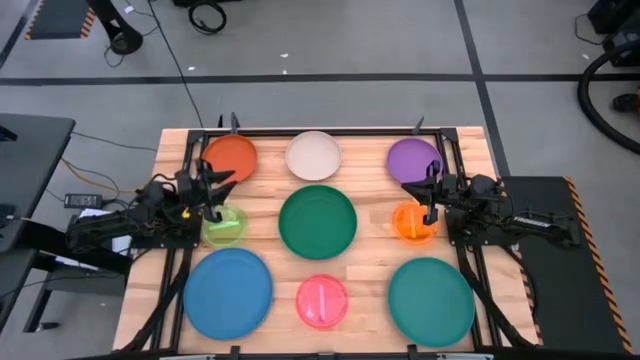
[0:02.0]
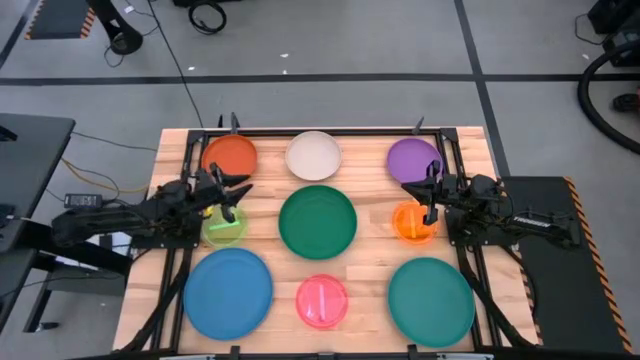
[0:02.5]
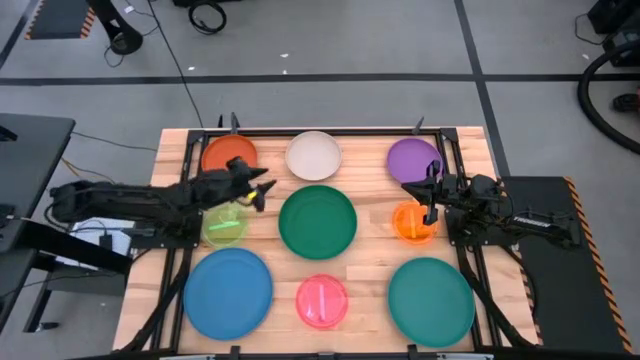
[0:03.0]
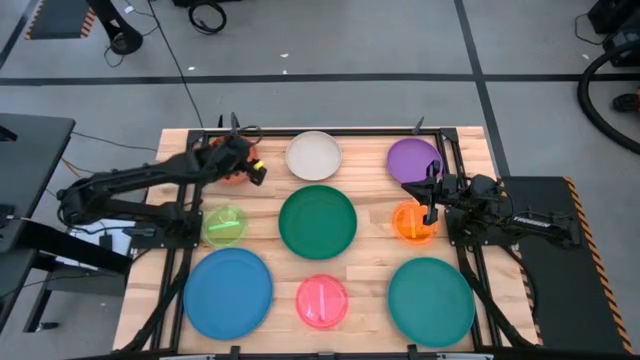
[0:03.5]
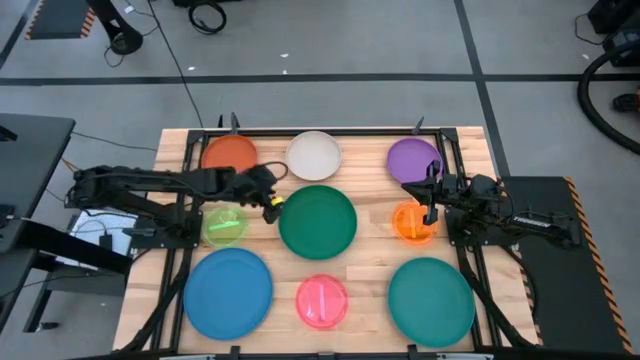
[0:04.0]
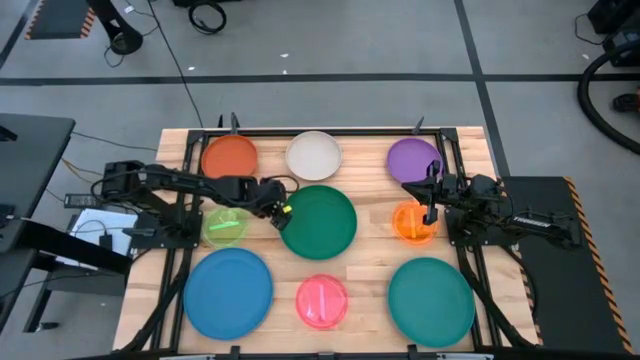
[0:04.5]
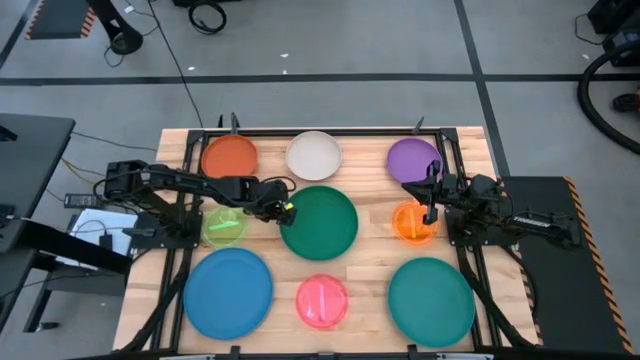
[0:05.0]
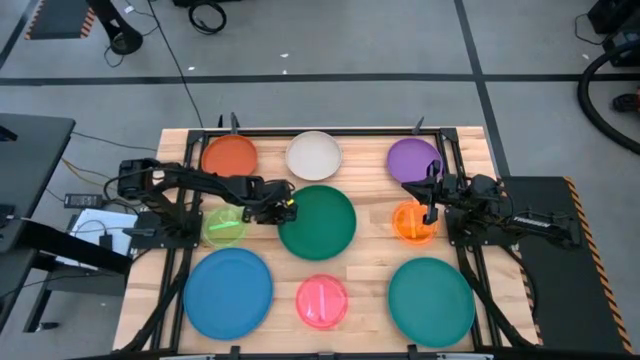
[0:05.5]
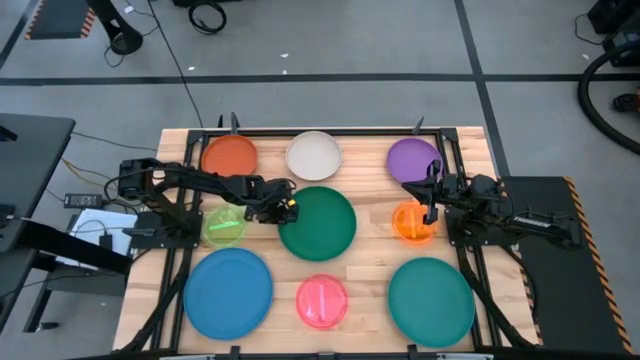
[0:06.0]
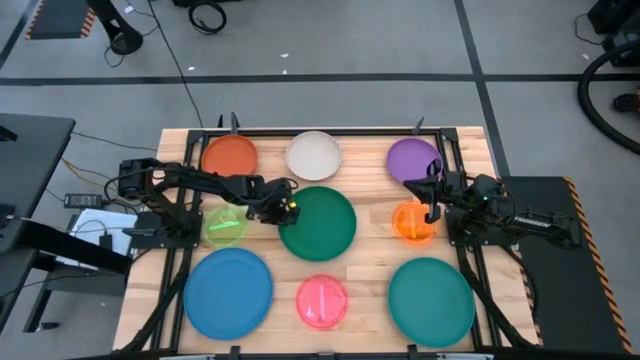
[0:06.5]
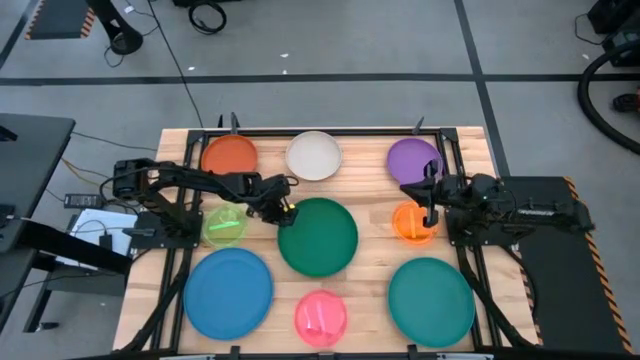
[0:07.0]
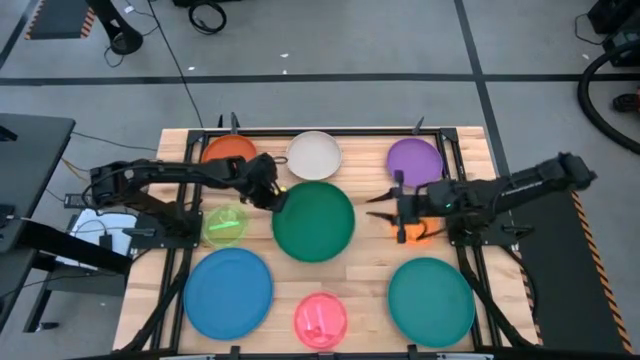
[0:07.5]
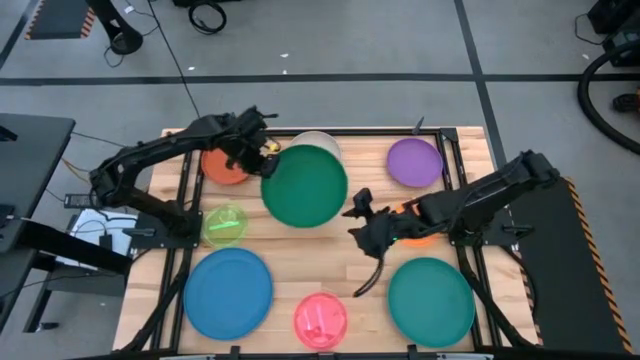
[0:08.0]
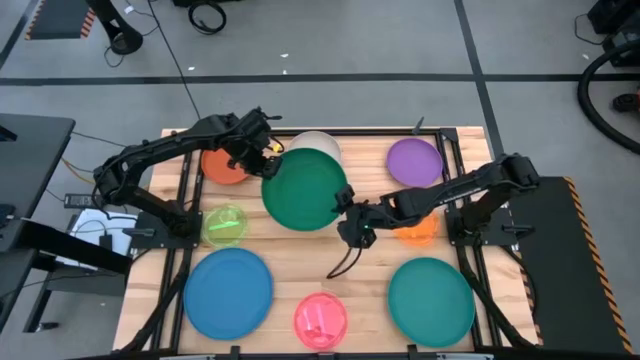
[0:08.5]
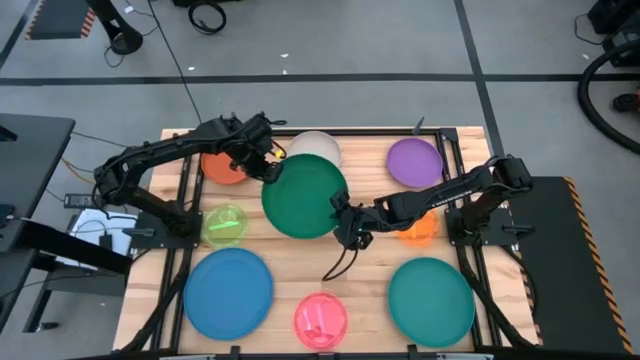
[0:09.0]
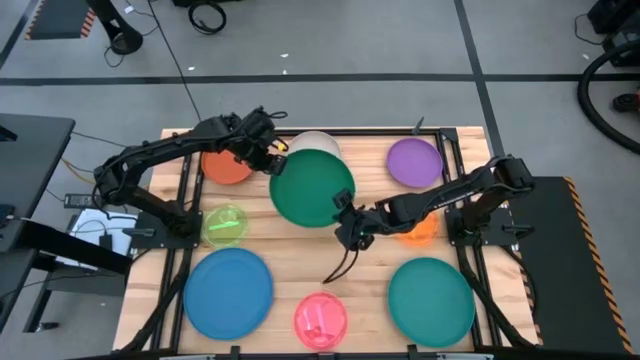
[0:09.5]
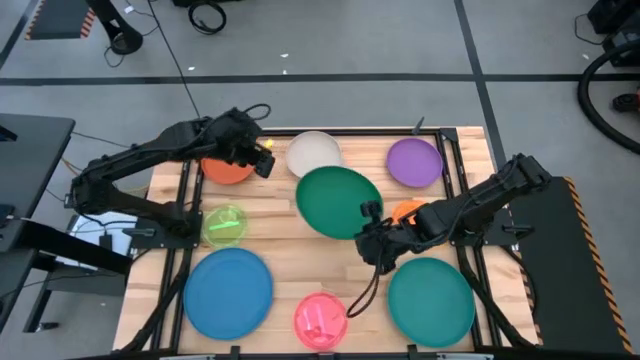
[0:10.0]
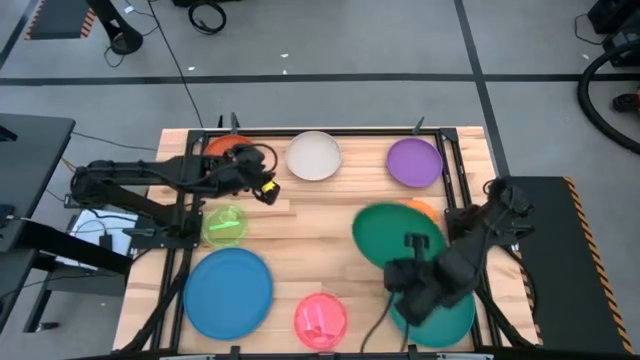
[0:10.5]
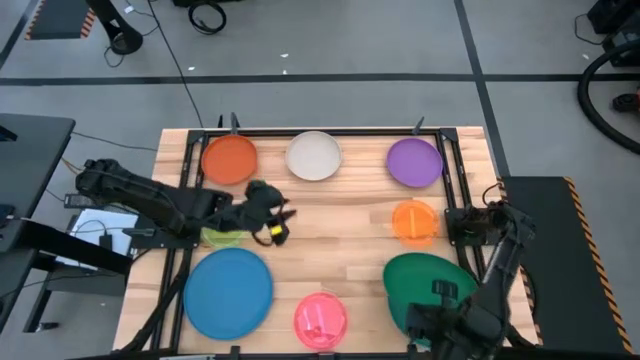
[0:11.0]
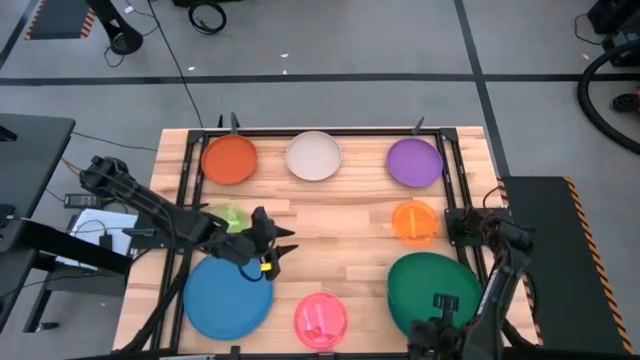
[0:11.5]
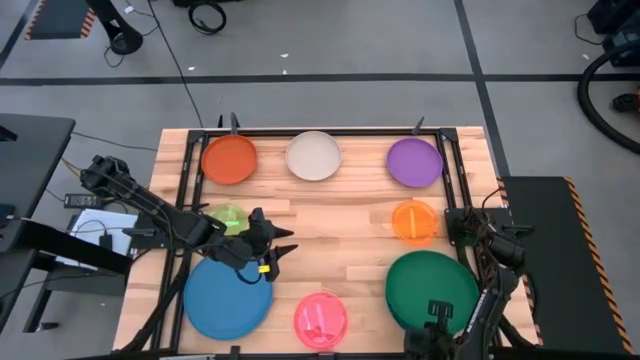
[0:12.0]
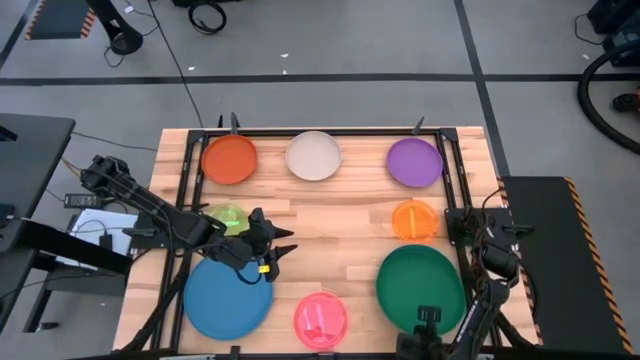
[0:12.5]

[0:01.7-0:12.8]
Task: Stack plastic plates
Stack the green plate on top of the light blue plate

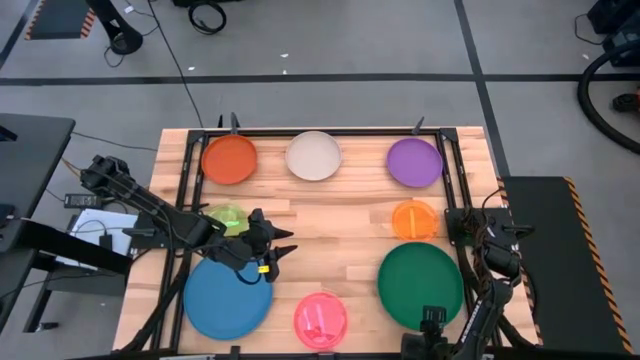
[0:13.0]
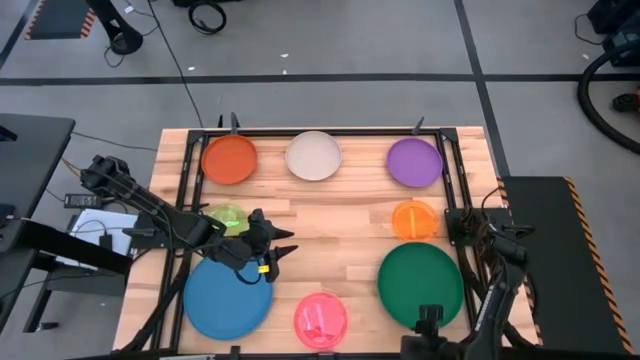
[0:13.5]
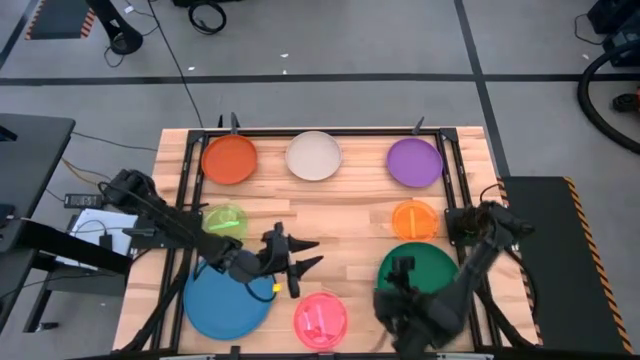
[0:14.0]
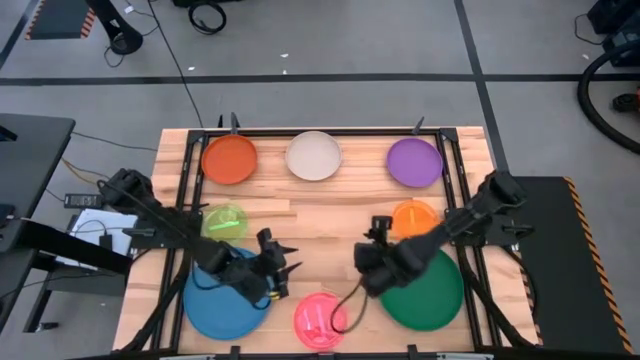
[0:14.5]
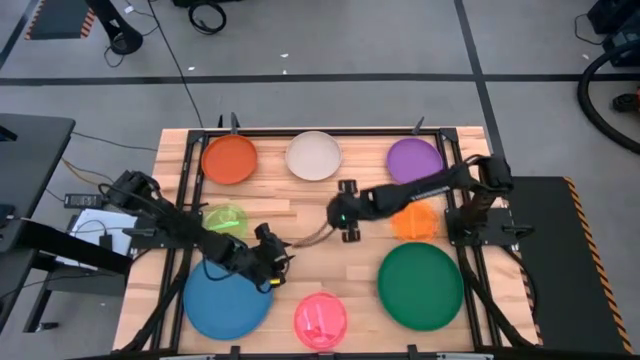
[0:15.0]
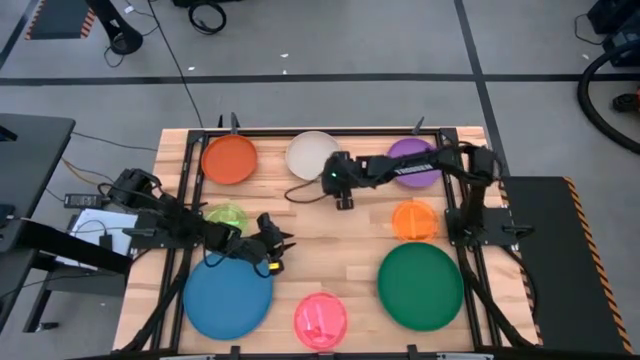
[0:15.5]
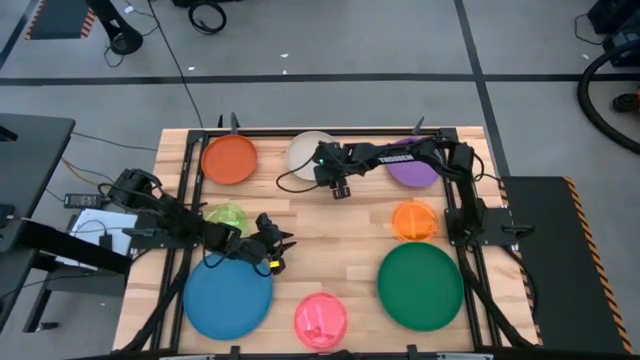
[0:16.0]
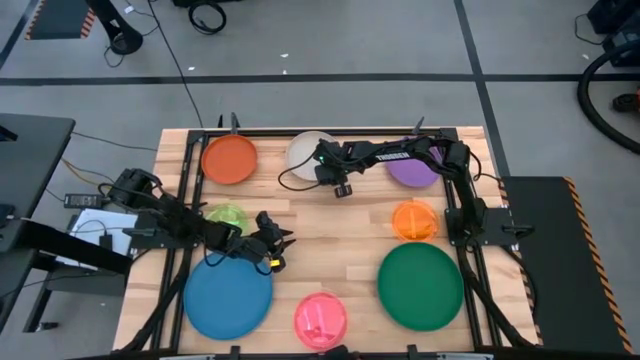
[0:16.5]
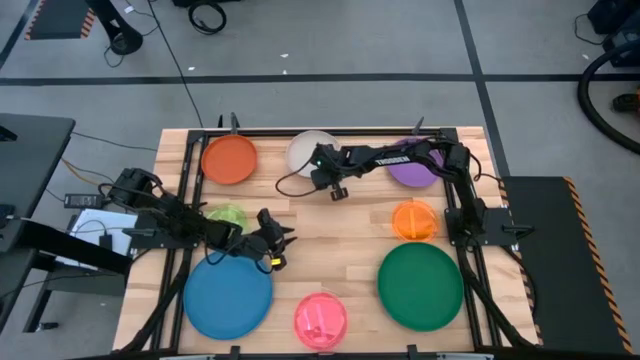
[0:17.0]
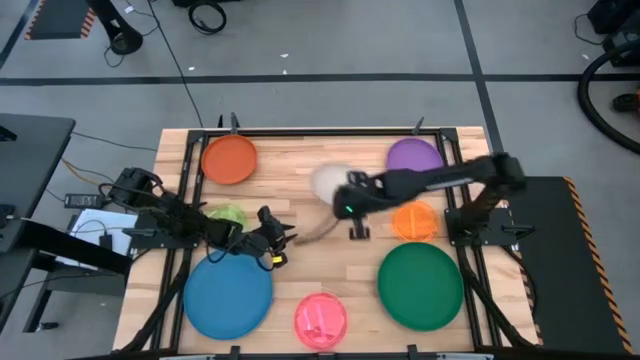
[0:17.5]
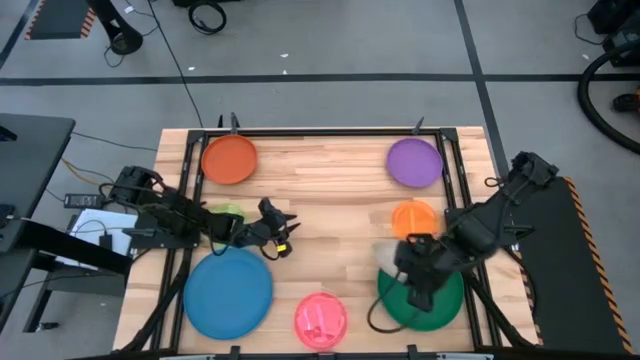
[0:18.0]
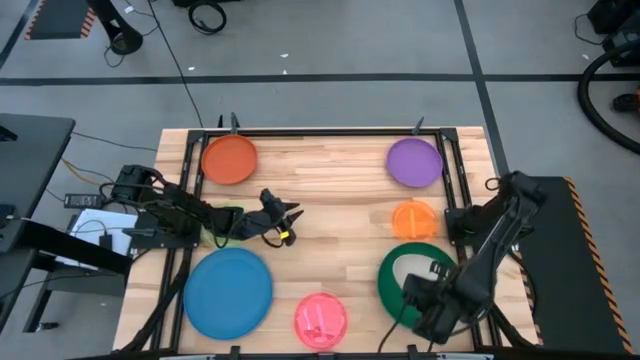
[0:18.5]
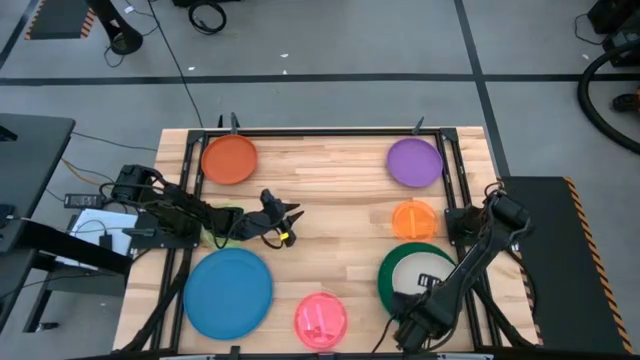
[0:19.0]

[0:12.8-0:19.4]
Stack the white plate on top of the green plate

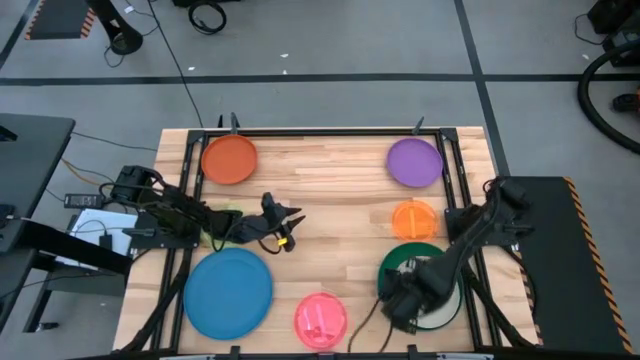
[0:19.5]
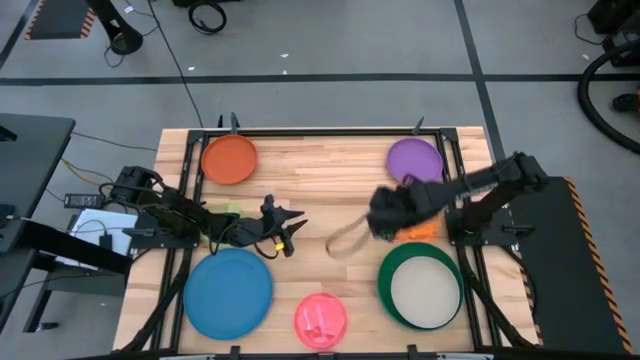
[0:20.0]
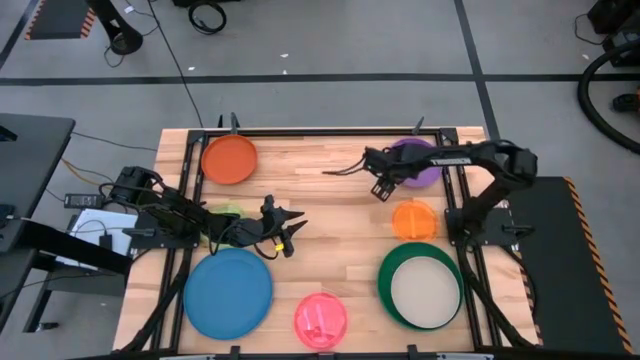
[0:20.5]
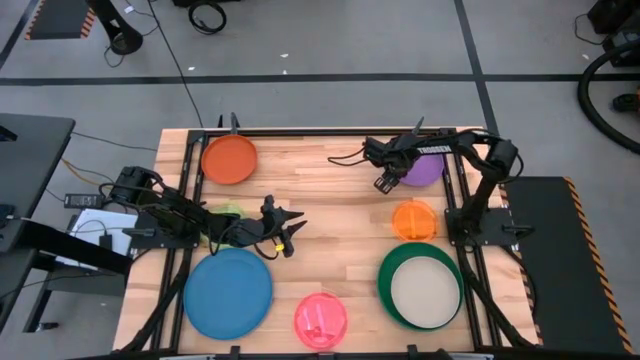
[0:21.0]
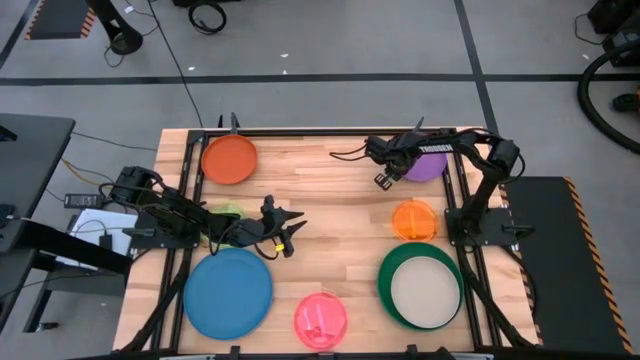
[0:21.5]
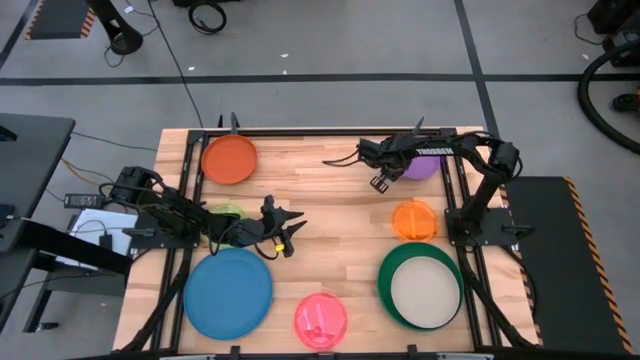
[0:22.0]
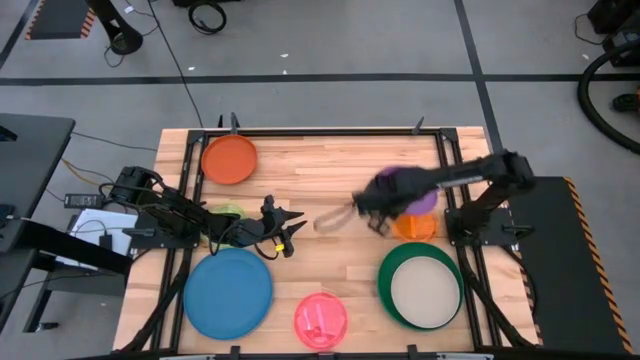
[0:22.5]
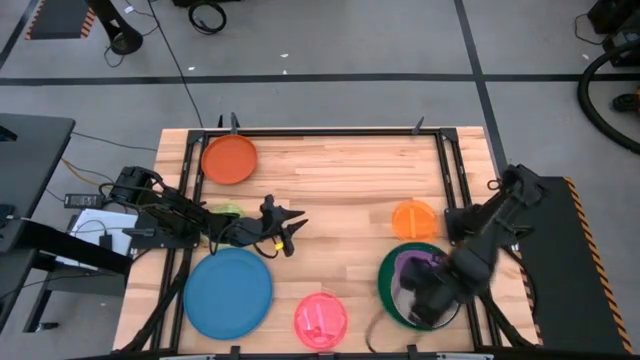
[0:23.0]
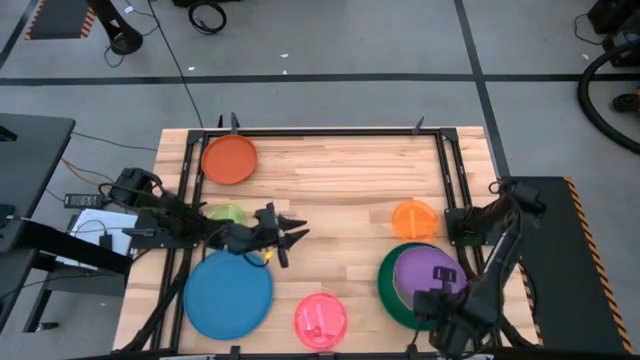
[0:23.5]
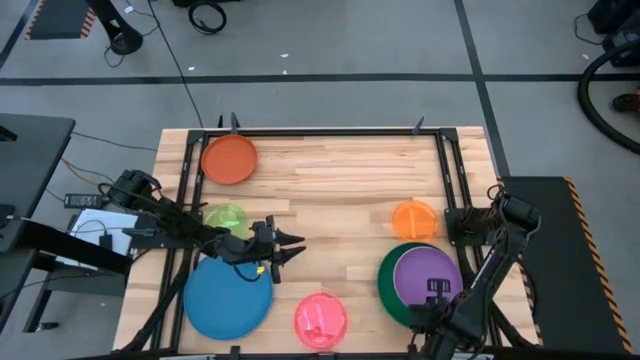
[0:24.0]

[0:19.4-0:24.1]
Stack the purple plate on top of the white plate
